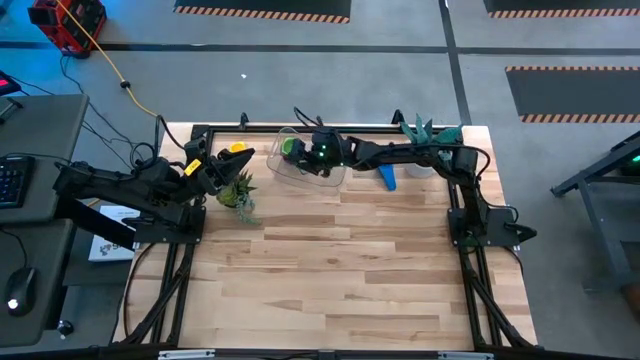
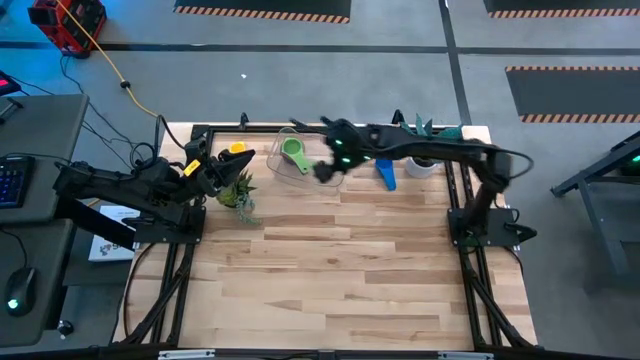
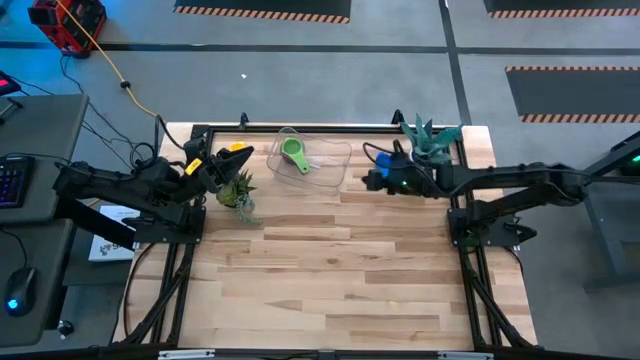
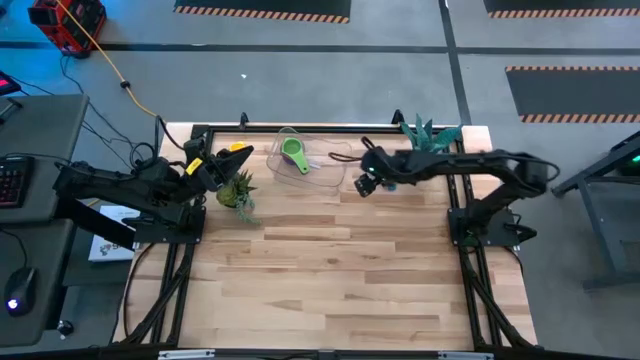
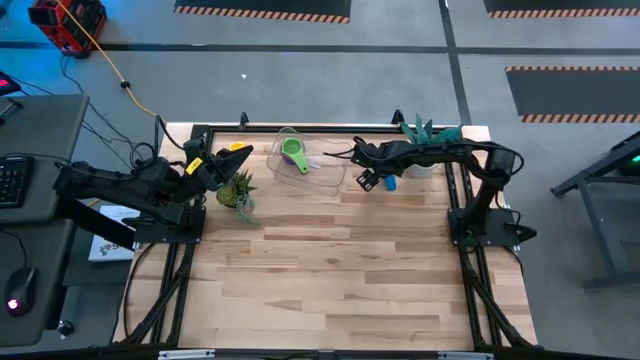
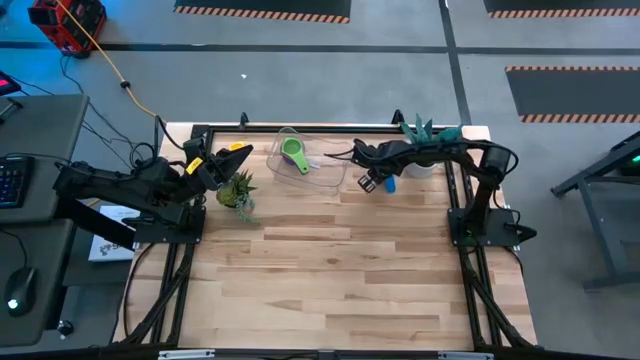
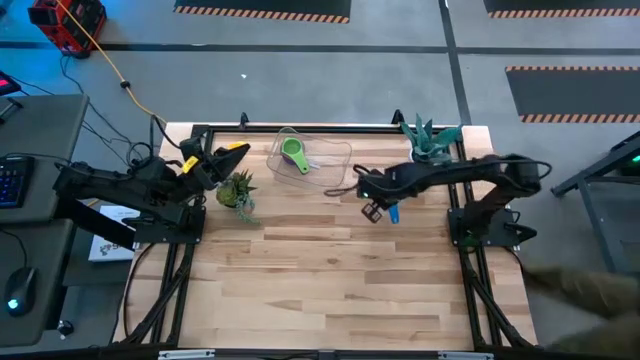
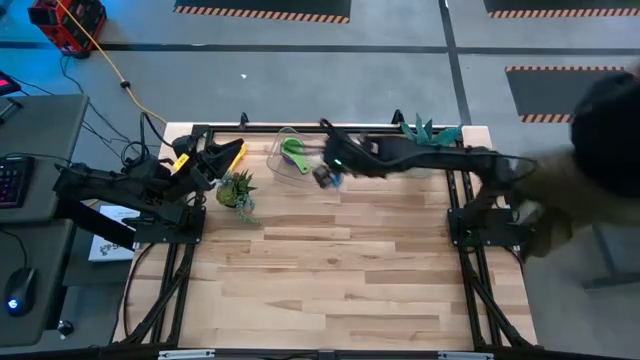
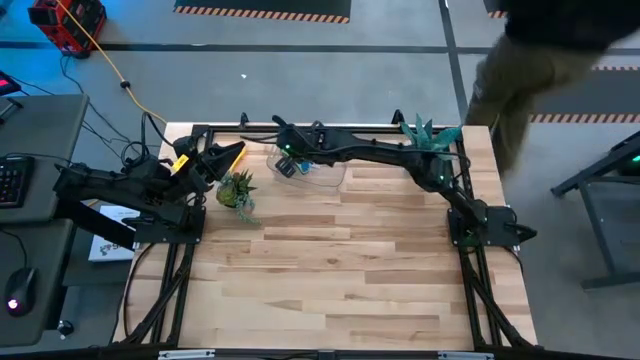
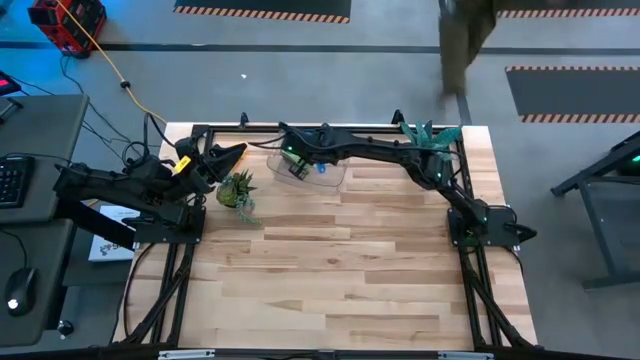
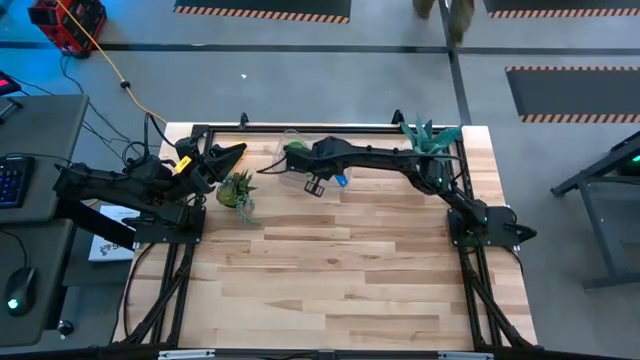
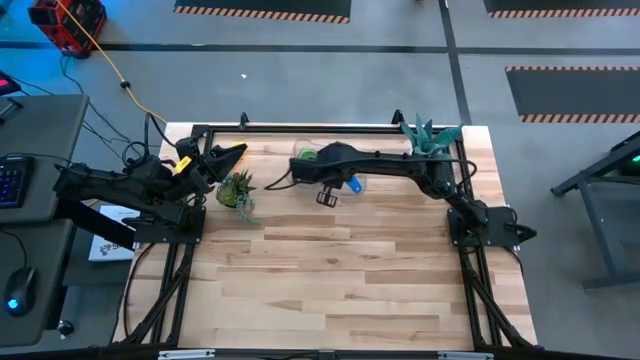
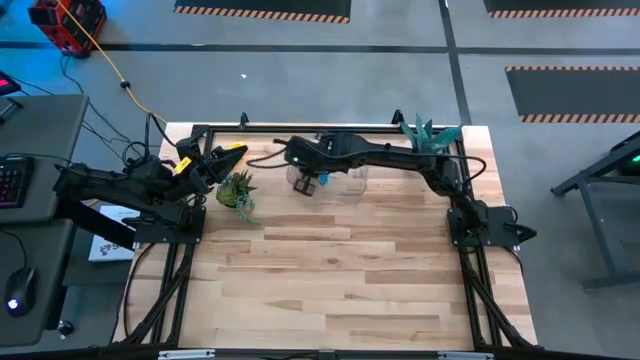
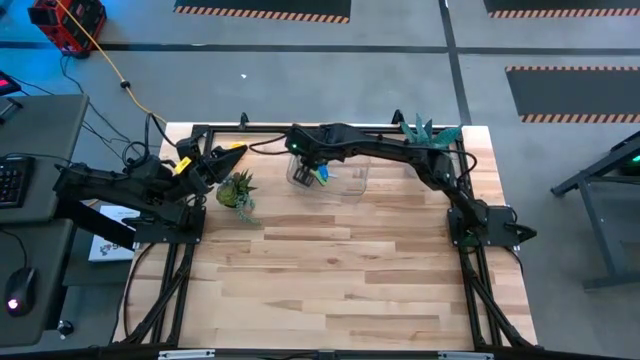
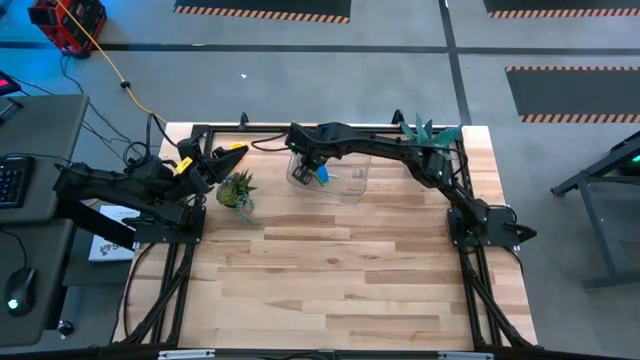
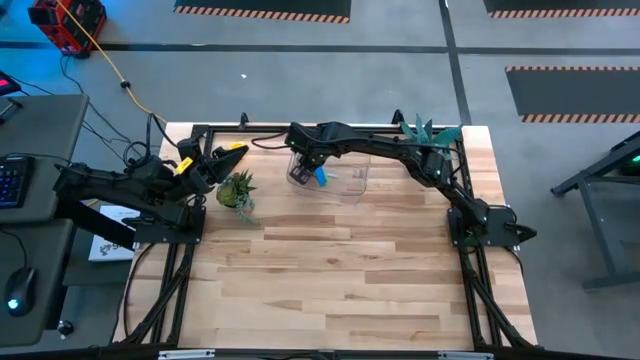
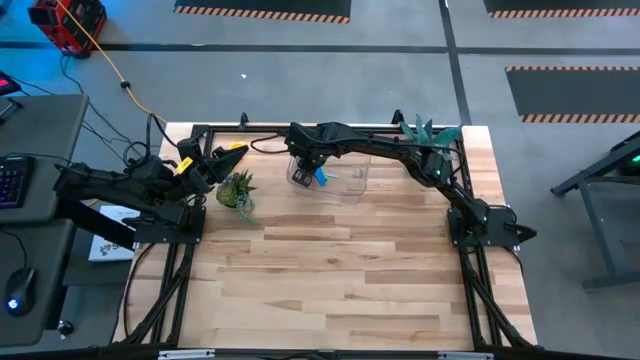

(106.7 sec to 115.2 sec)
Task: Nest measuring cups in basket
Stack the blue measuring cup on top of the green measuring cup on the transparent bin

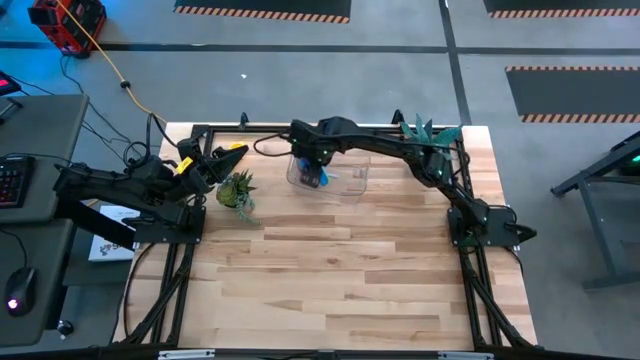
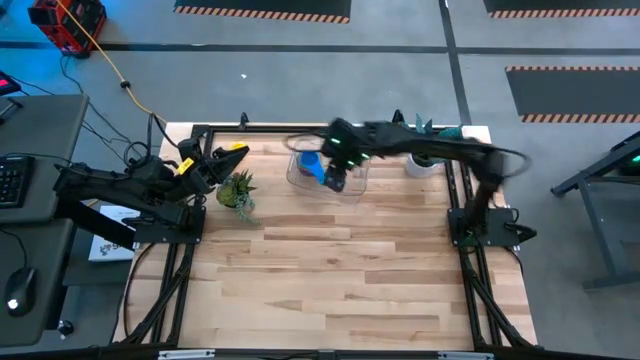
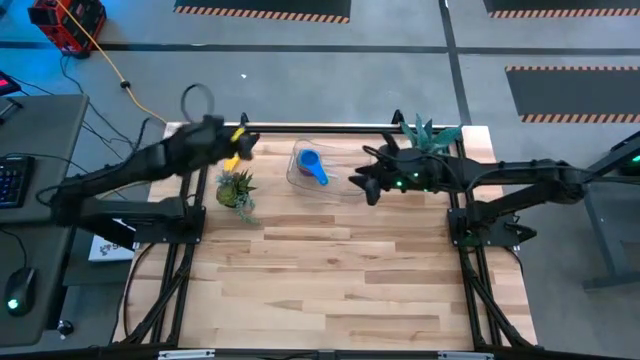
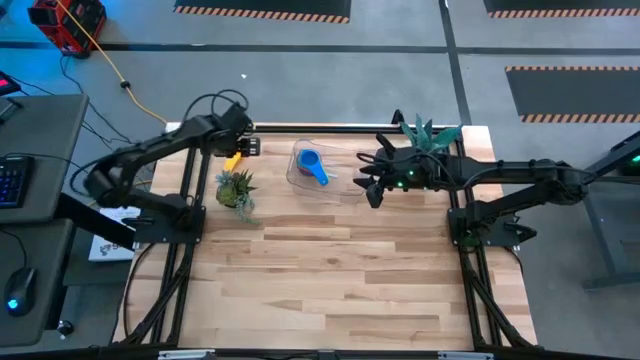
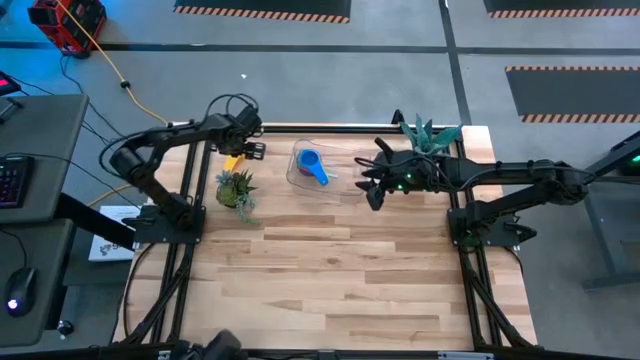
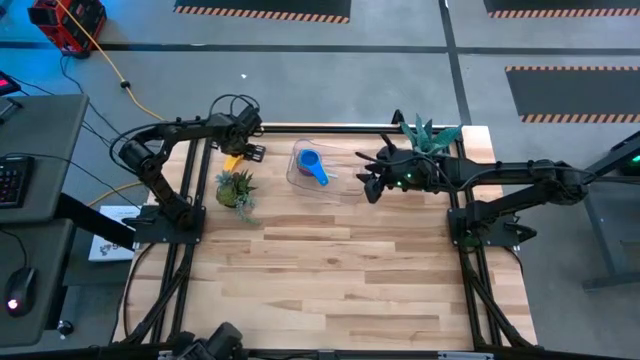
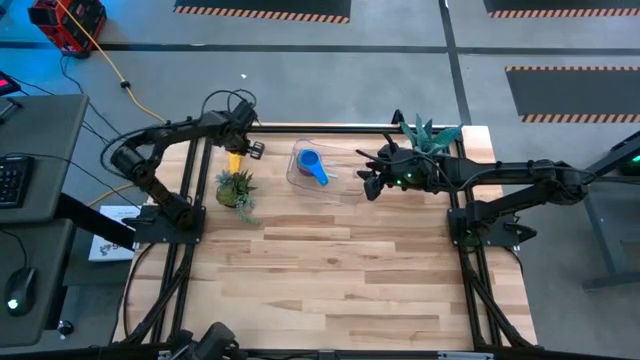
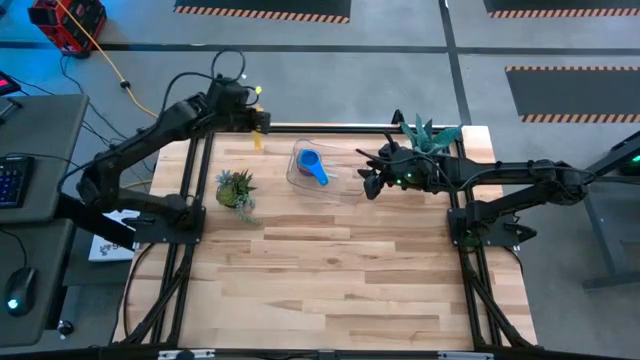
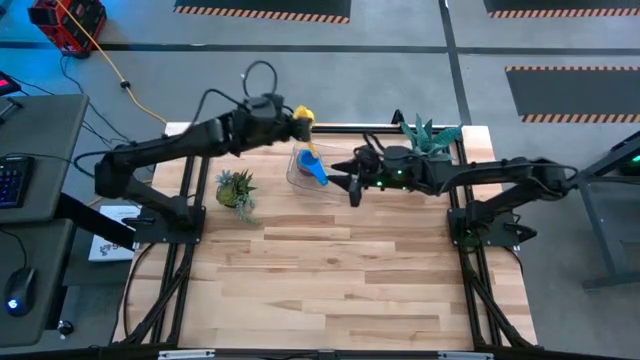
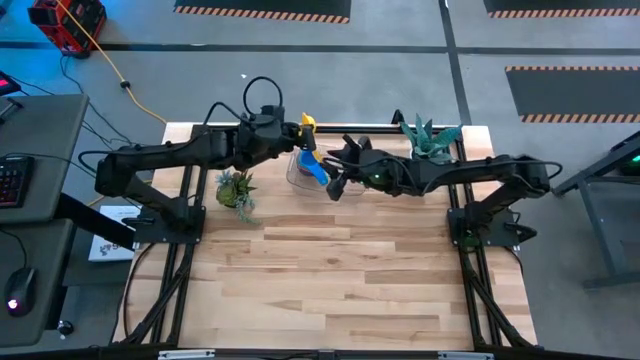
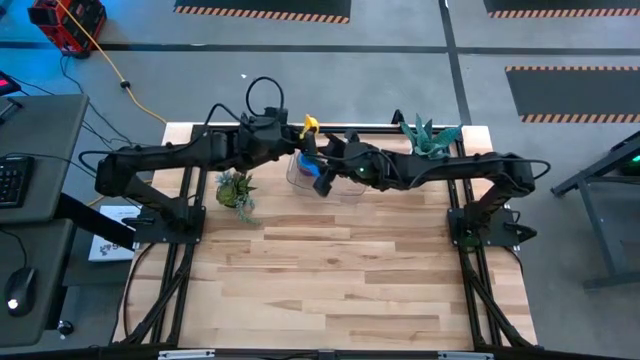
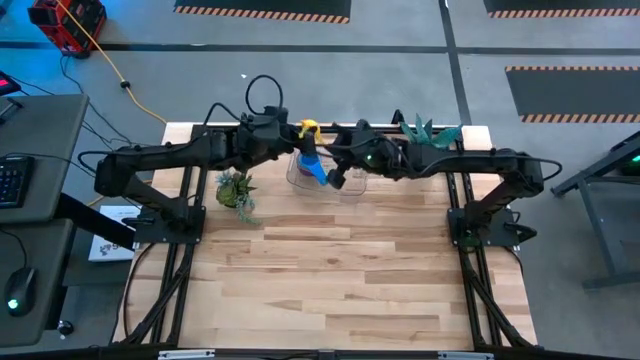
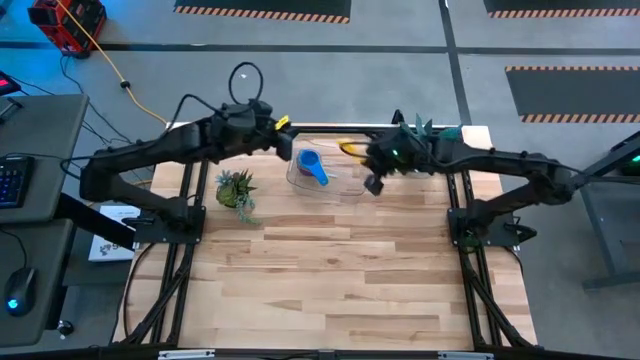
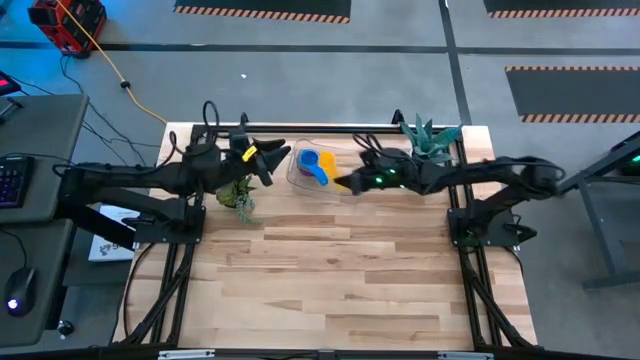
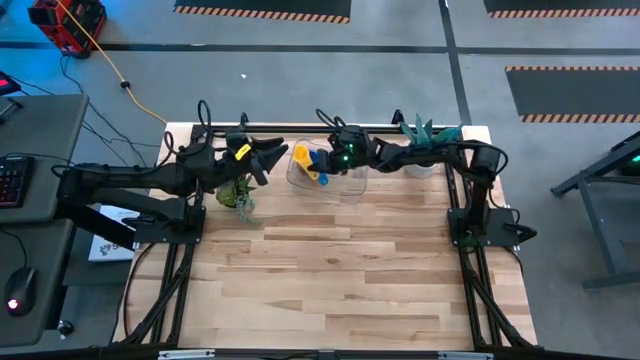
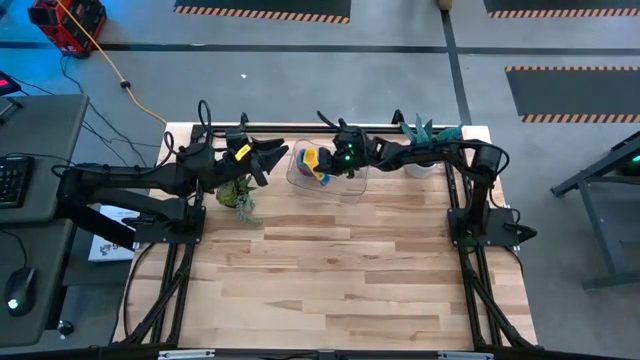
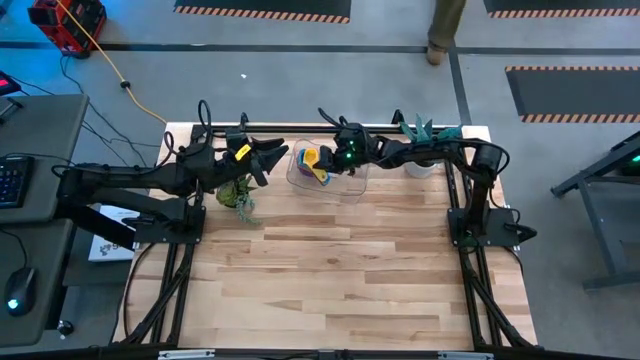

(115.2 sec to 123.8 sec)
Stack the yellow measuring cup on top of the blue measuring cup on the transparent bin

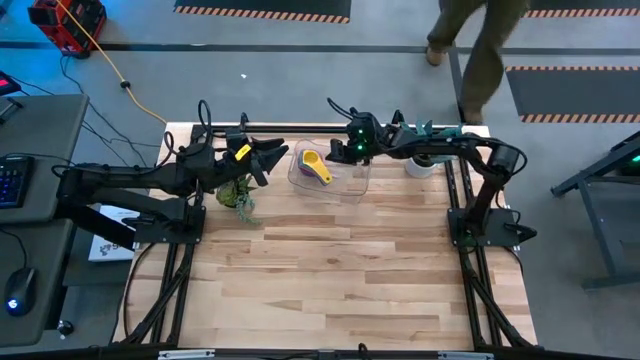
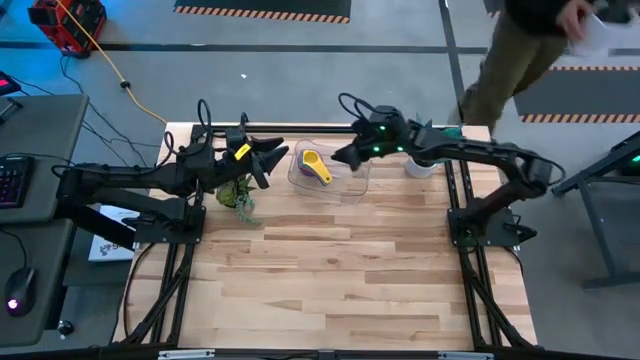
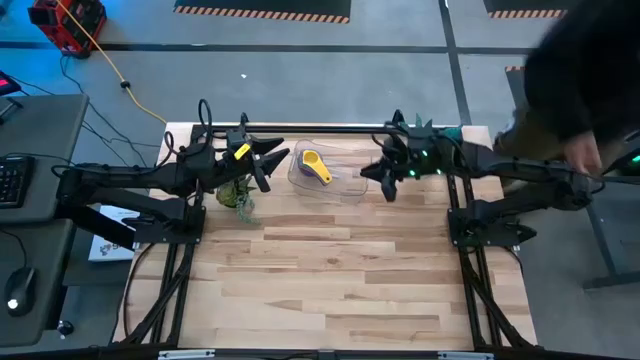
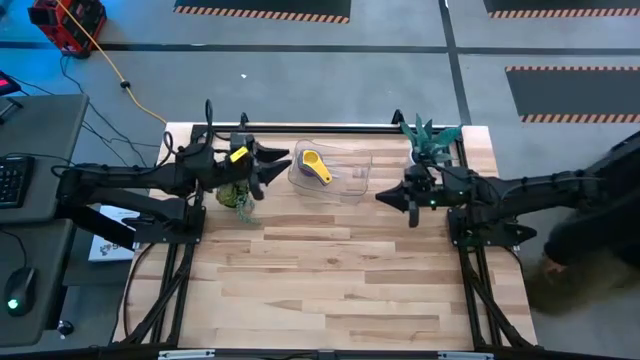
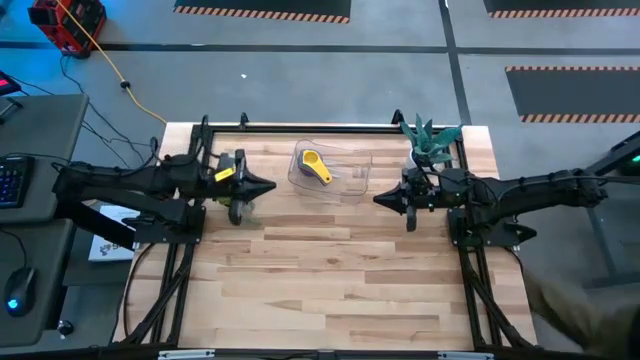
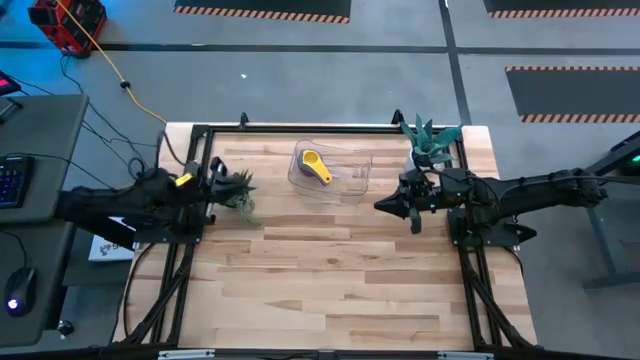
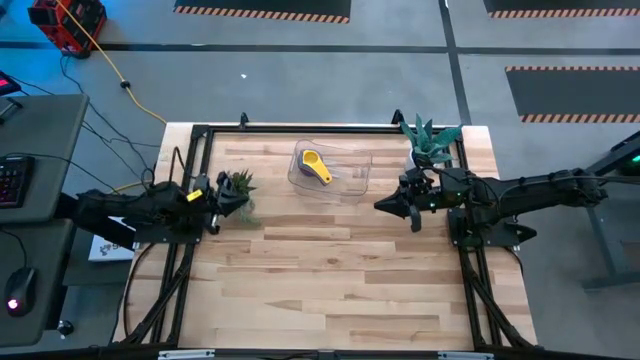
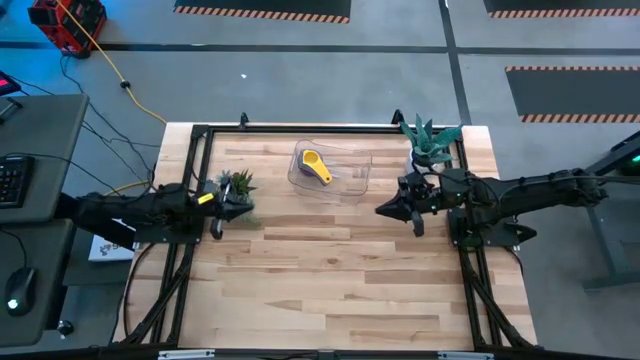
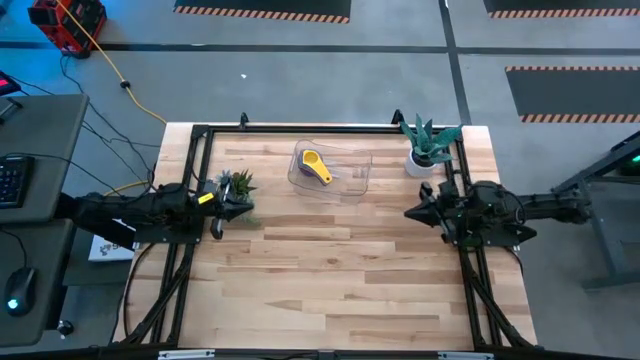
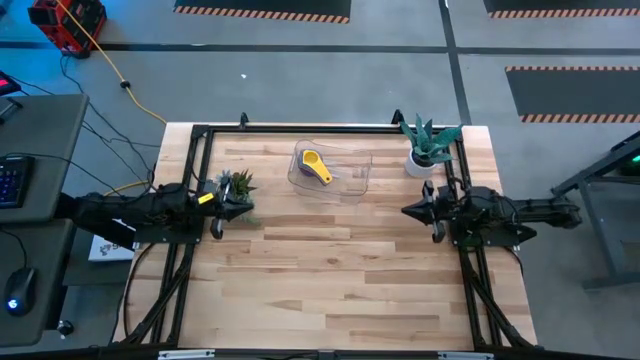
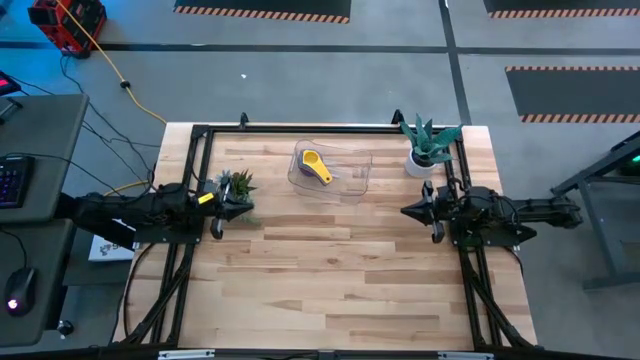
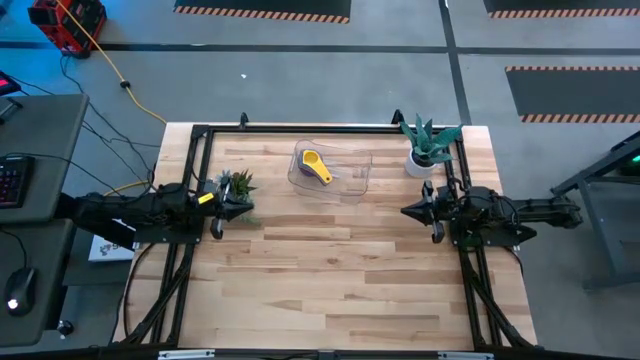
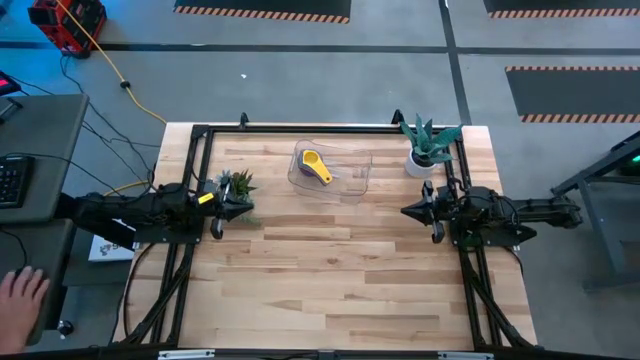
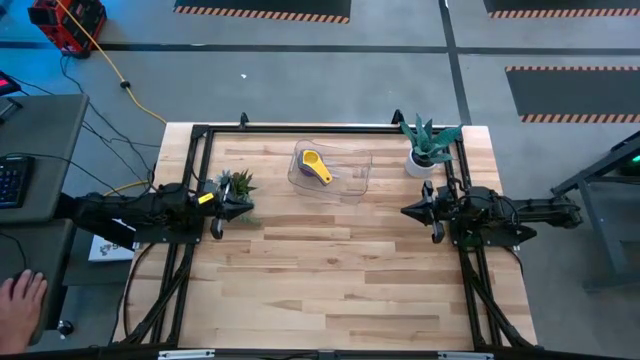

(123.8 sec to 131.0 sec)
Return to Home Position
